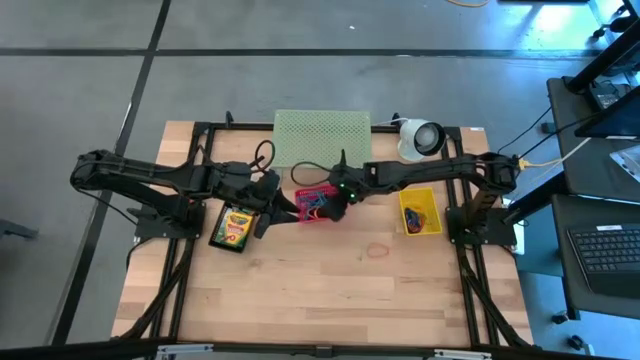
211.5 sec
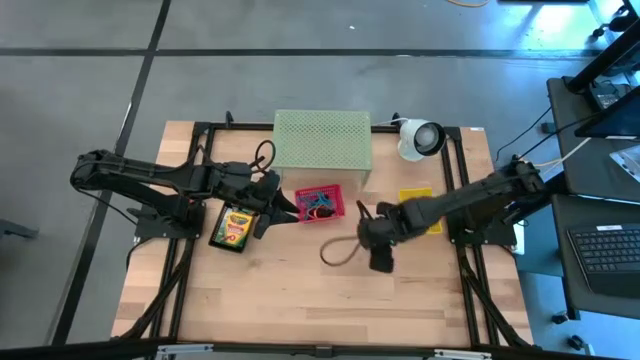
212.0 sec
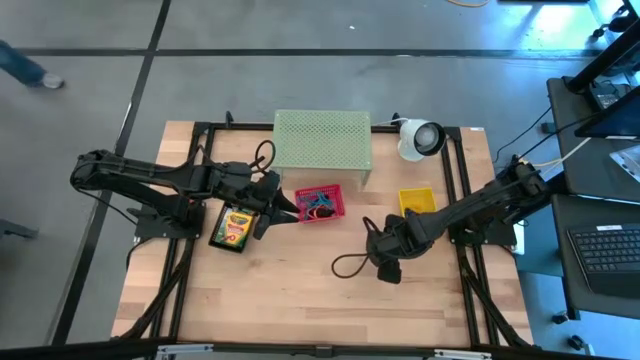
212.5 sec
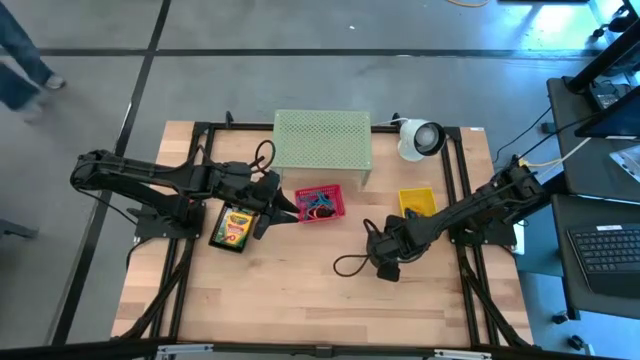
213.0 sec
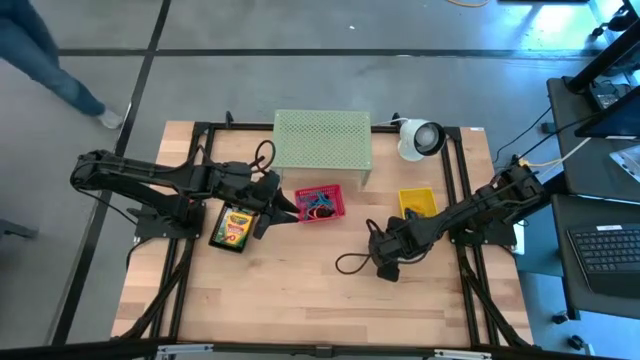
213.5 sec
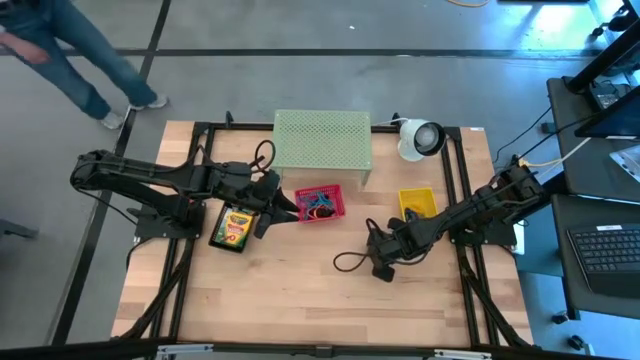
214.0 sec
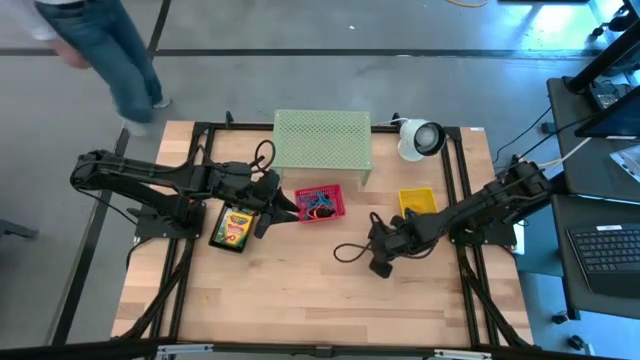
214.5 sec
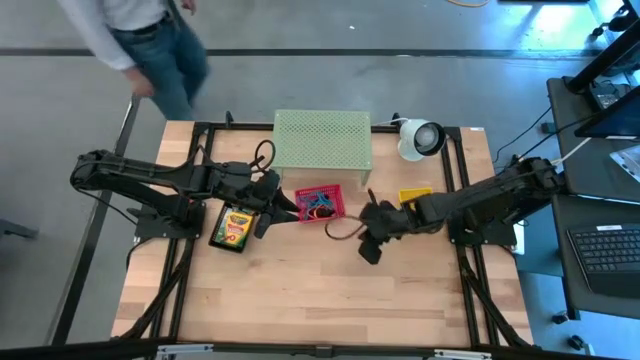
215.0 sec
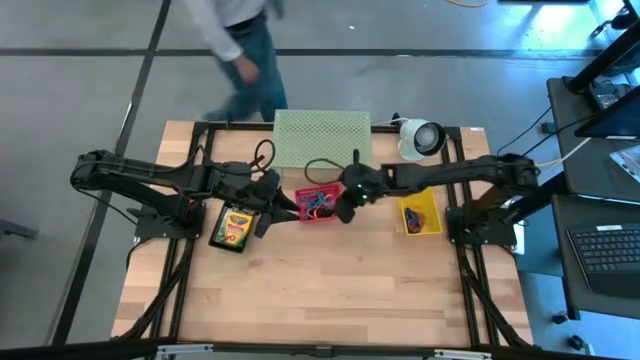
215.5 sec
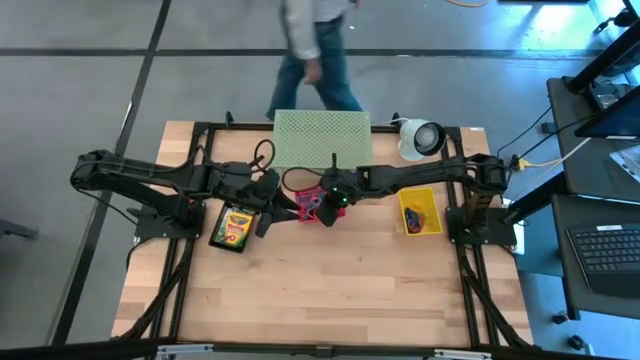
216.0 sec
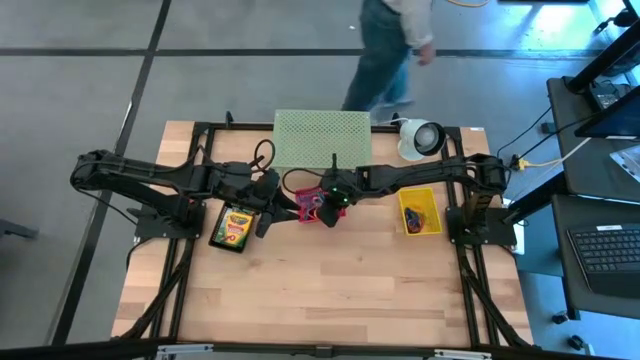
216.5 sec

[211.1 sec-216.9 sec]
Task: Pick & Place Office Desk Supplies
Put the orange rubber band into the red bin

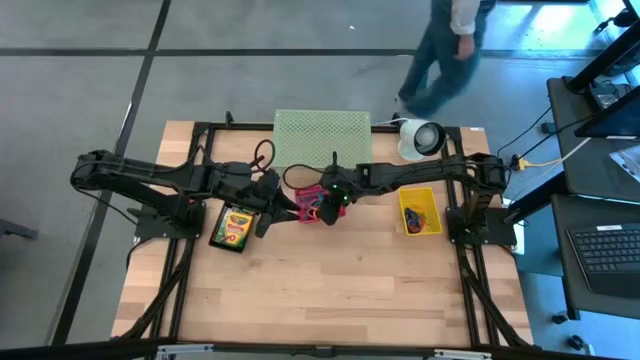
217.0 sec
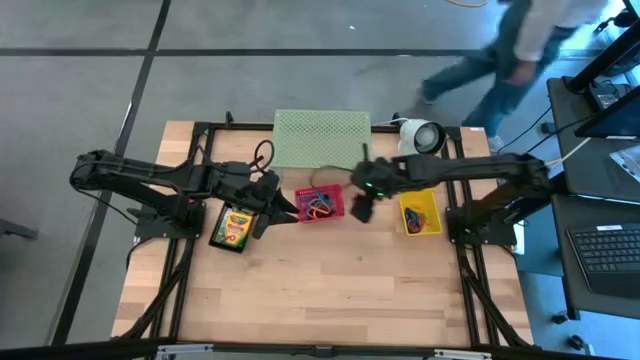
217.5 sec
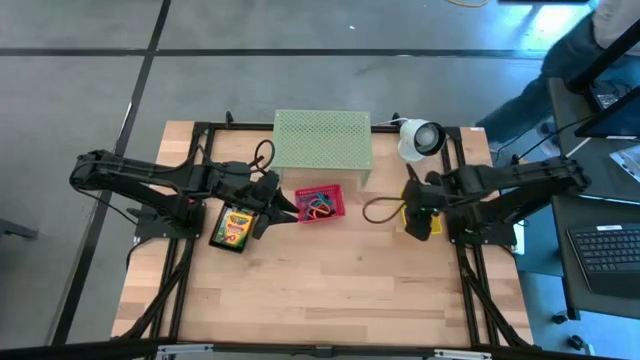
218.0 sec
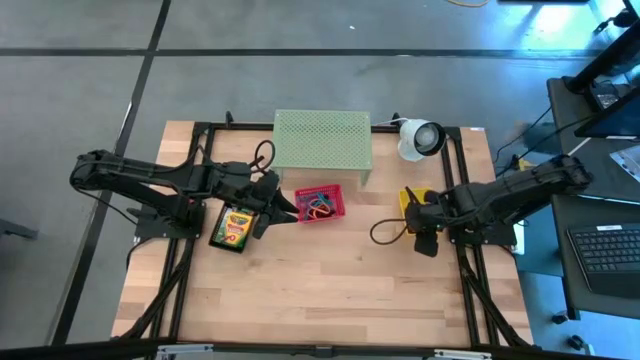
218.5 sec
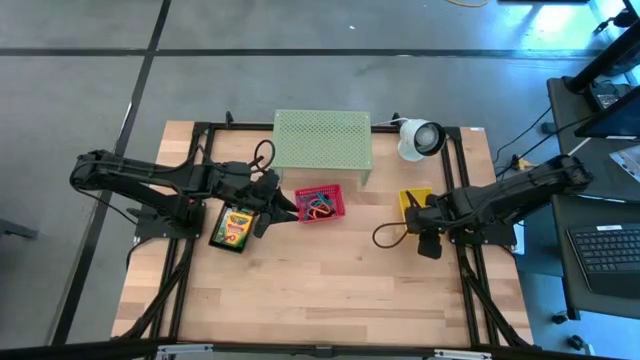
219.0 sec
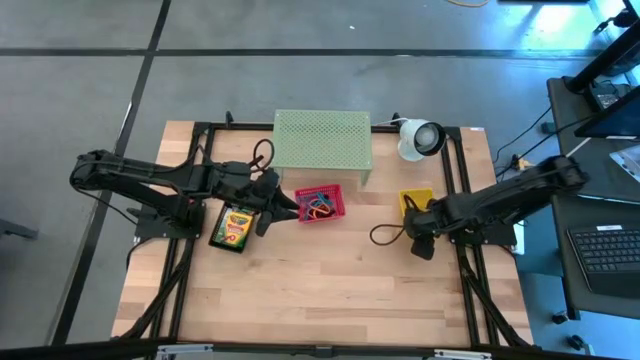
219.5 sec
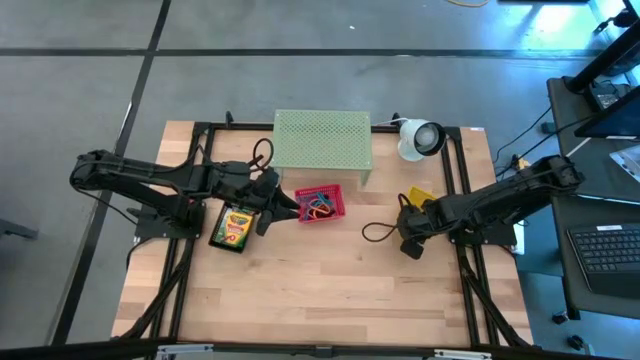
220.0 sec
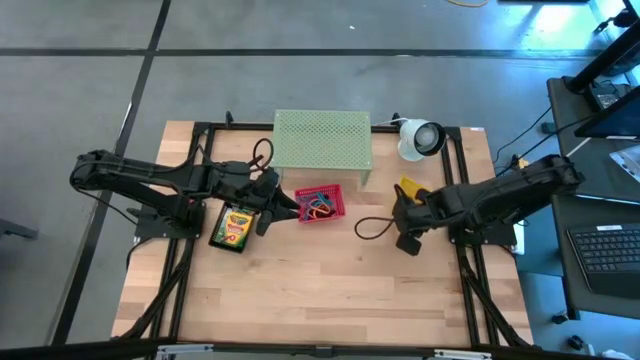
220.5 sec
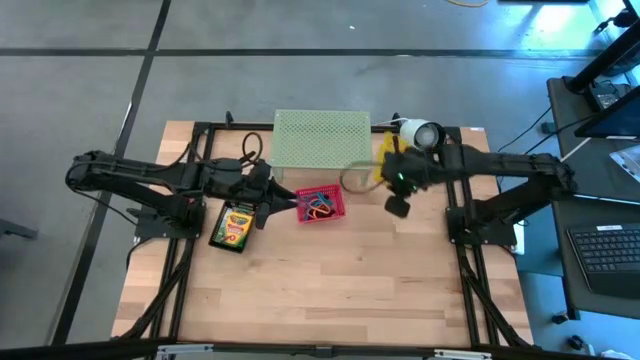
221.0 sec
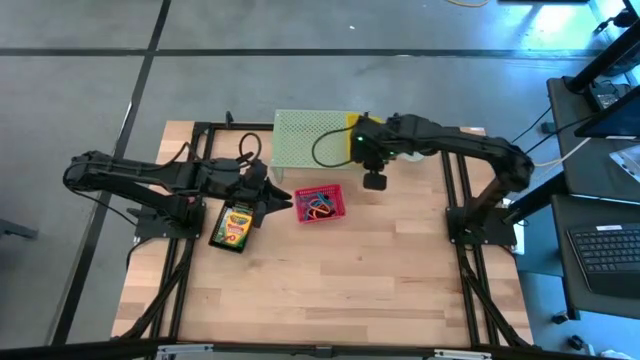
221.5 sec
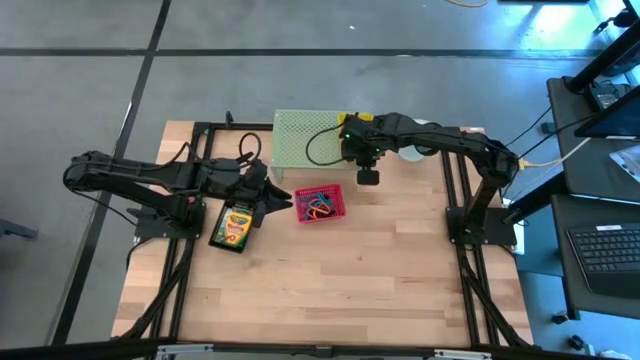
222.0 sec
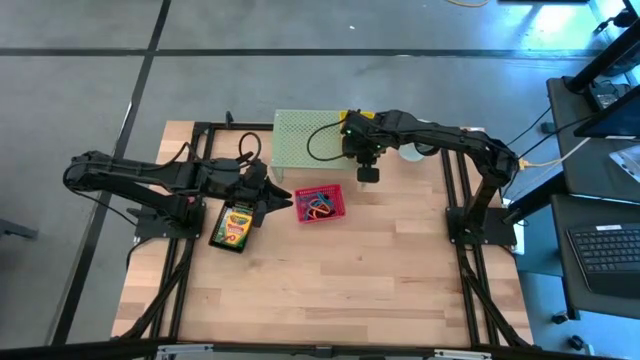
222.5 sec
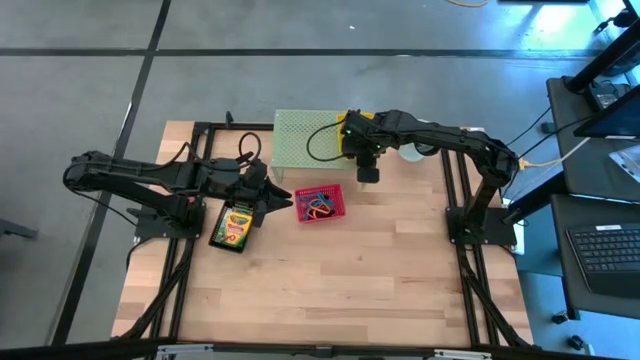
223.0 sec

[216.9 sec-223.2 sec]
Put the yellow bin on the shelf

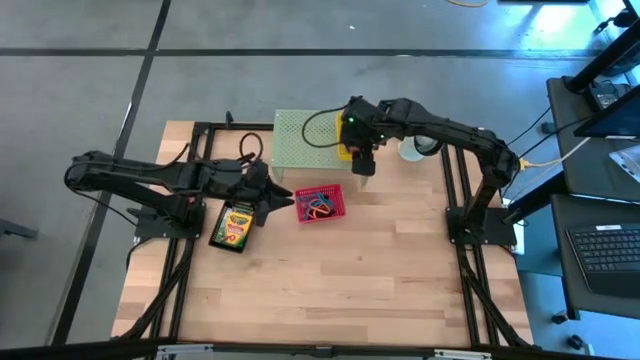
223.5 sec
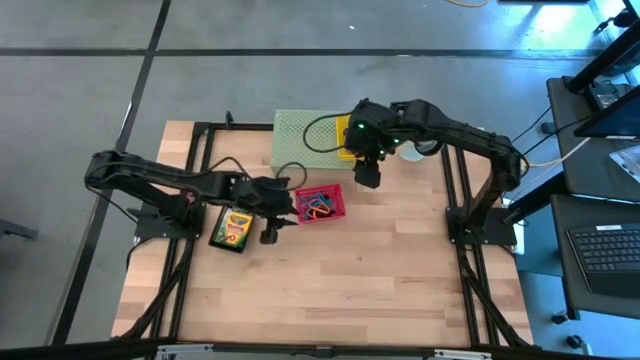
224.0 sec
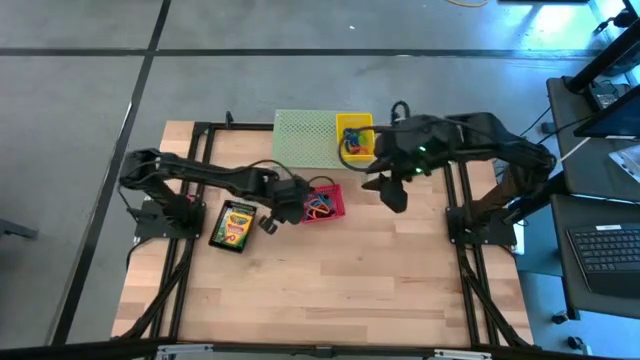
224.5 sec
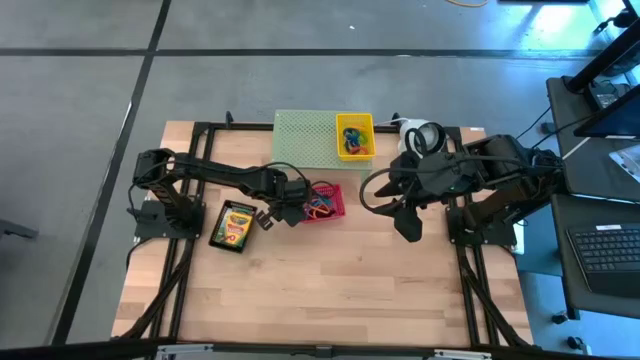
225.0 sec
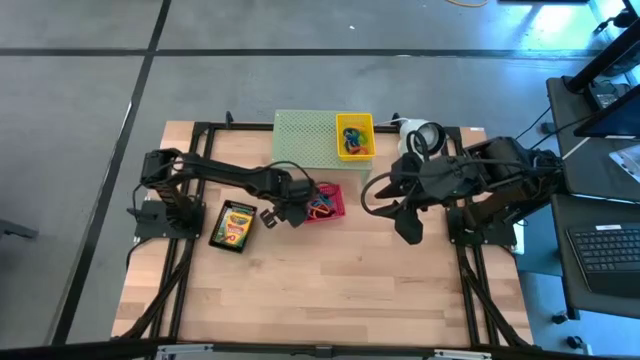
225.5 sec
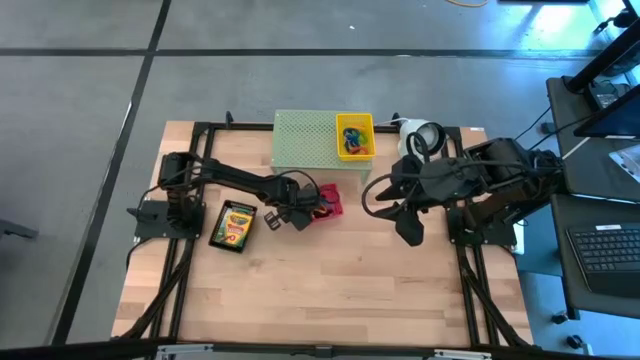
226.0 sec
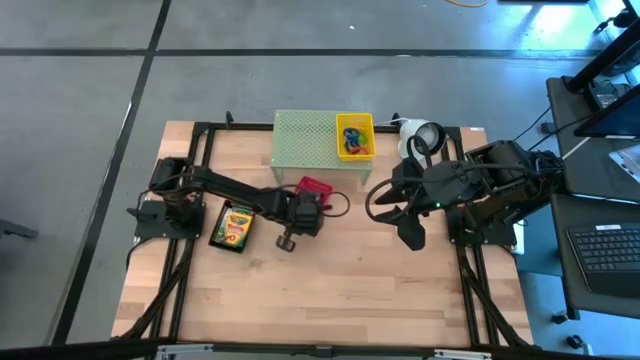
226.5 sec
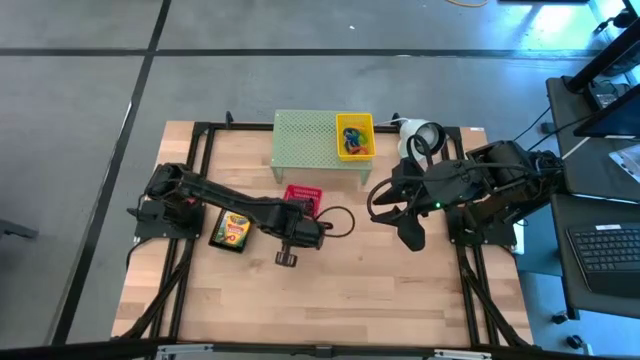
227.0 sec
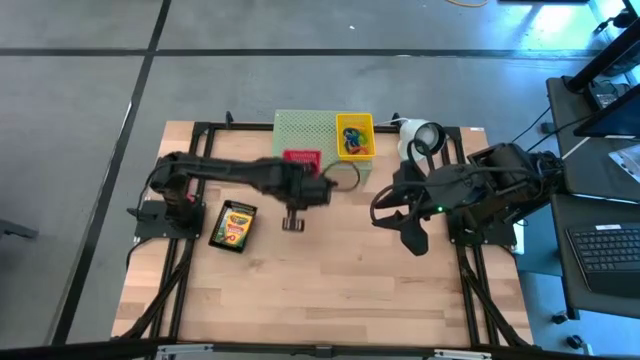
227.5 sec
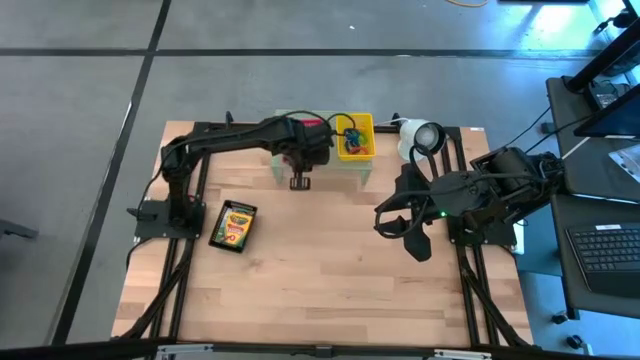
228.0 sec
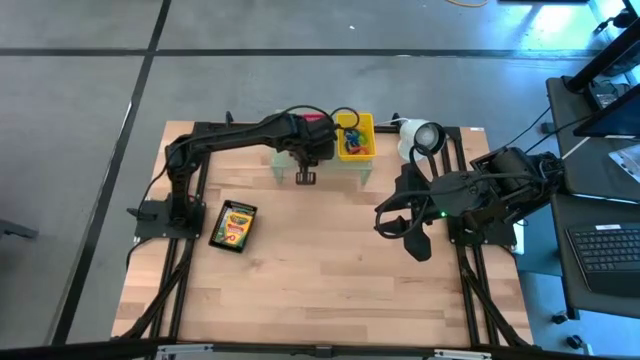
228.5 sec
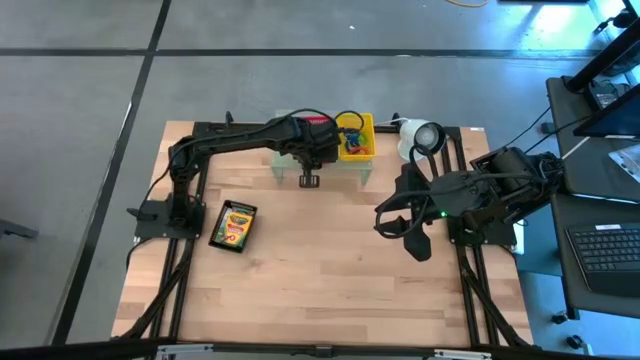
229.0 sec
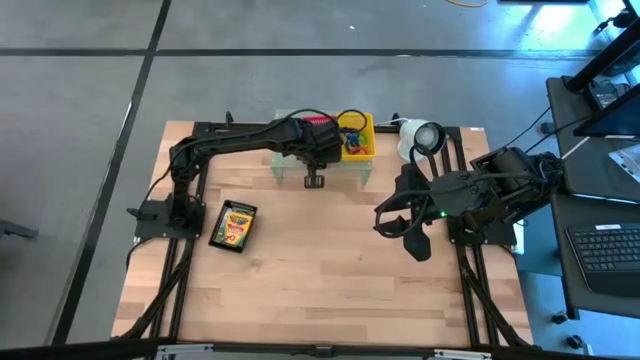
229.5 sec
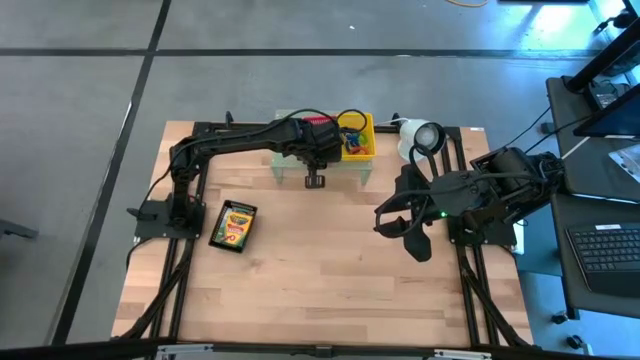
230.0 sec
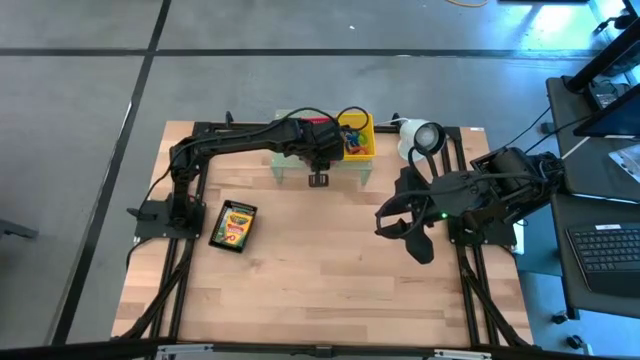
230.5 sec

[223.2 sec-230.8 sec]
Put the red bin on the shelf

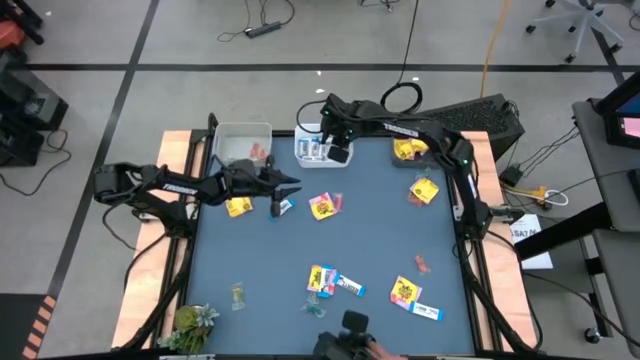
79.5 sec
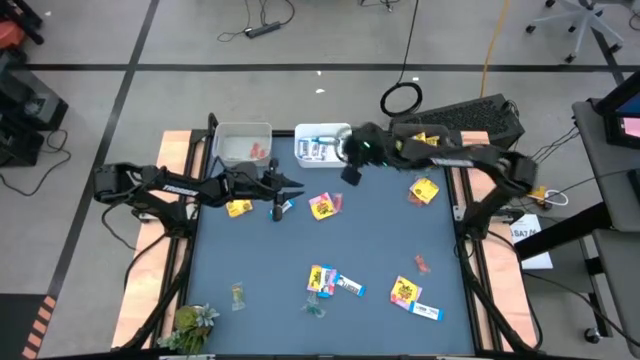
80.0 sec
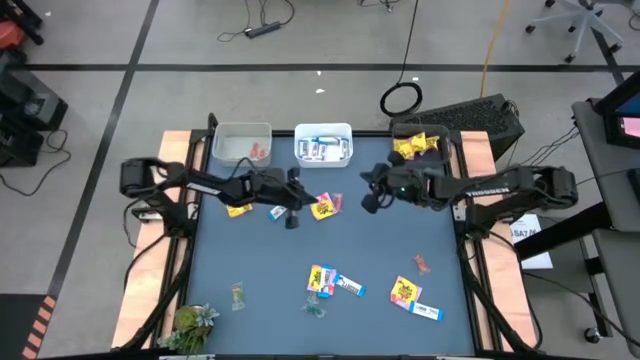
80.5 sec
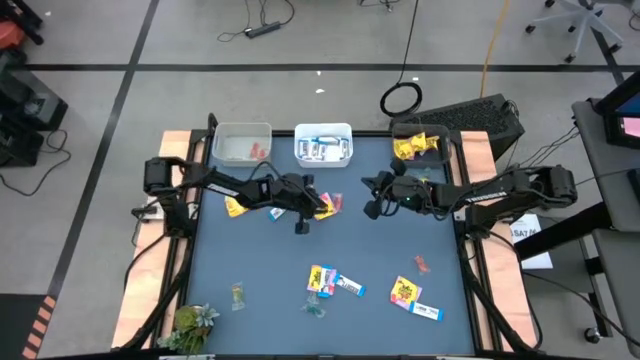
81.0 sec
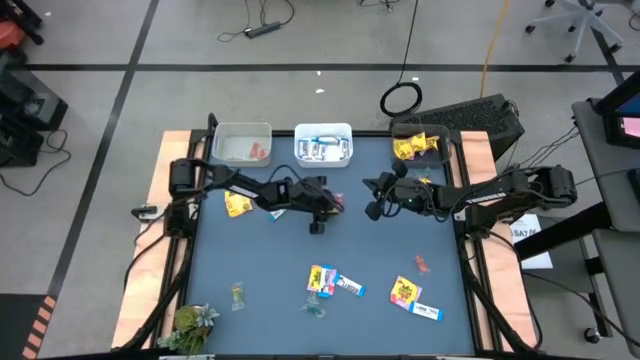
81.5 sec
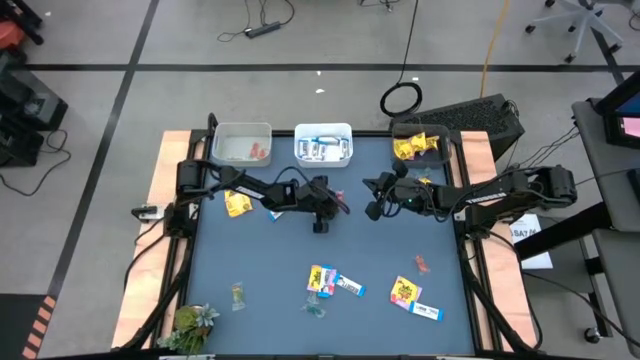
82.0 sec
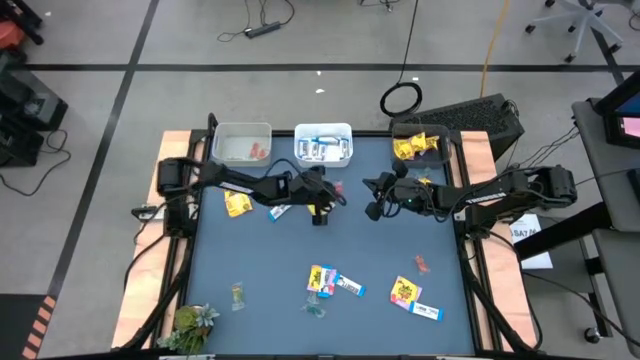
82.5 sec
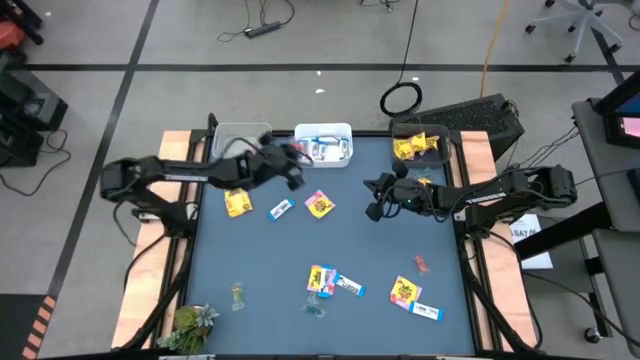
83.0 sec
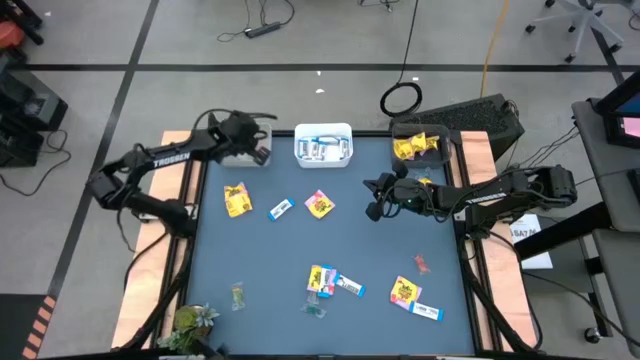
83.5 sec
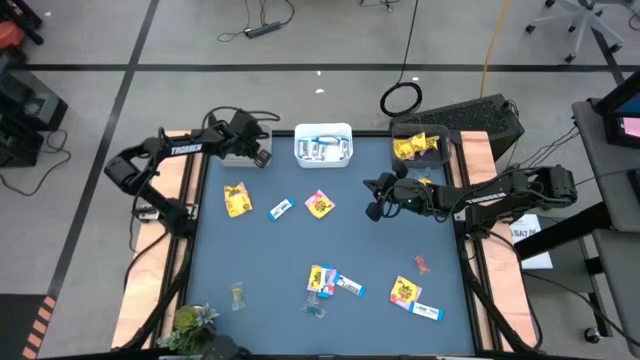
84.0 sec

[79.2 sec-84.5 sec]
Task: Sort candy
Put the red gummy into the gray bin
